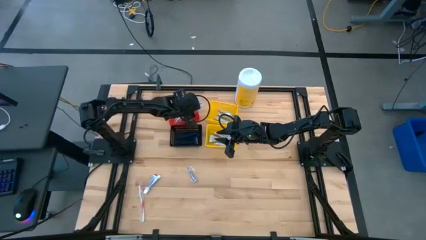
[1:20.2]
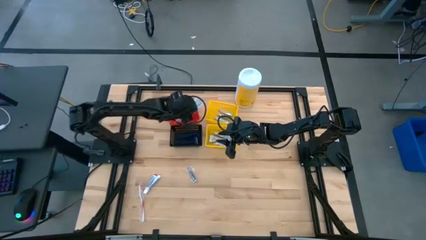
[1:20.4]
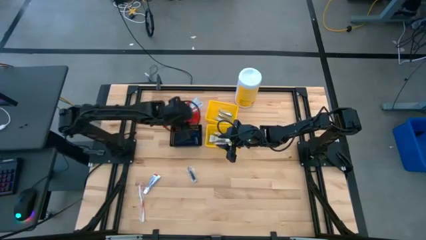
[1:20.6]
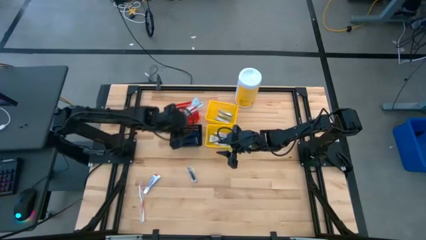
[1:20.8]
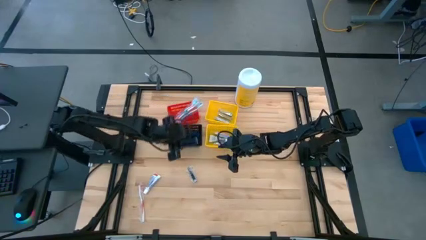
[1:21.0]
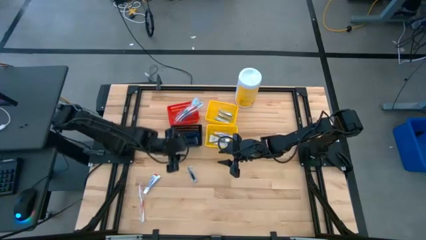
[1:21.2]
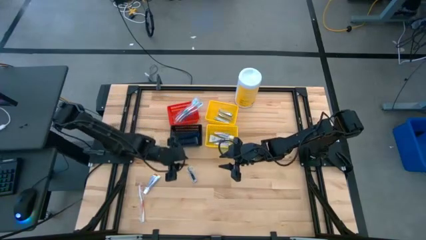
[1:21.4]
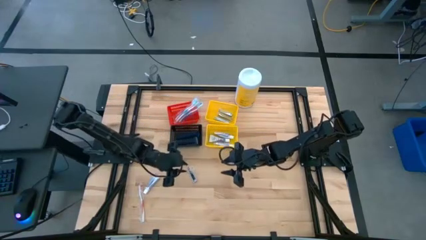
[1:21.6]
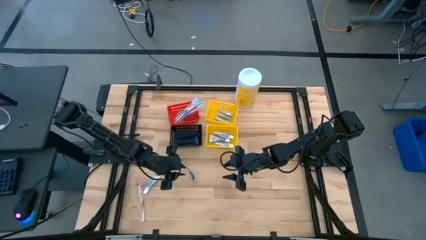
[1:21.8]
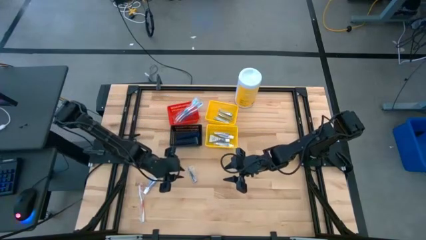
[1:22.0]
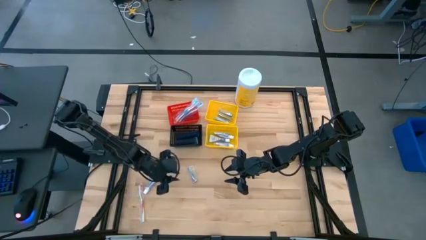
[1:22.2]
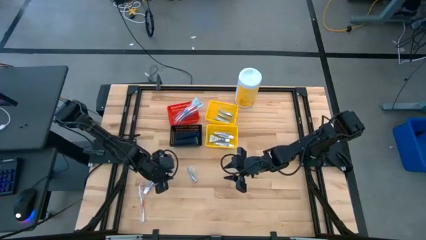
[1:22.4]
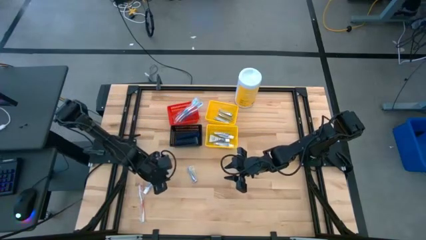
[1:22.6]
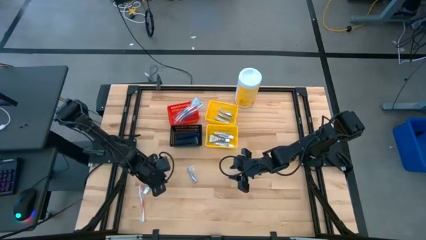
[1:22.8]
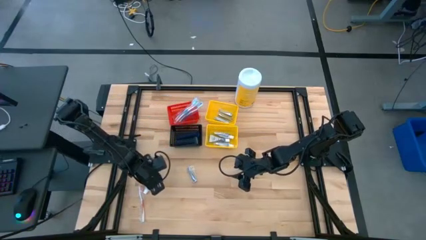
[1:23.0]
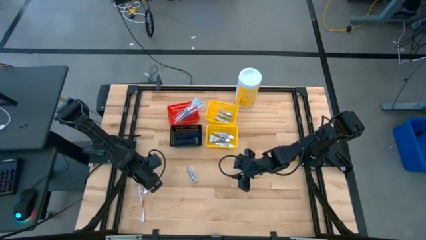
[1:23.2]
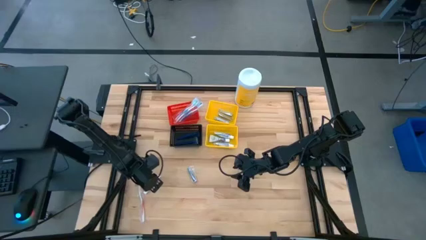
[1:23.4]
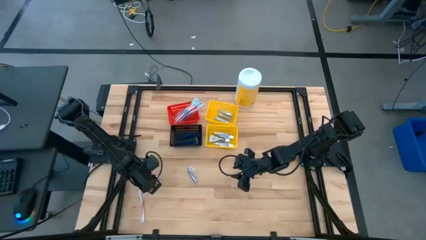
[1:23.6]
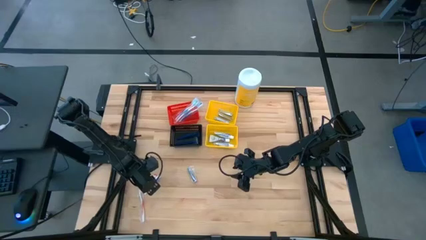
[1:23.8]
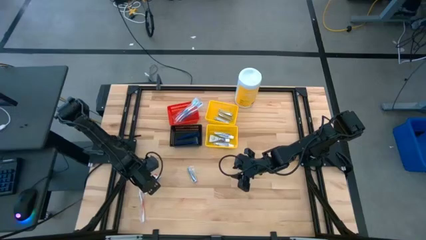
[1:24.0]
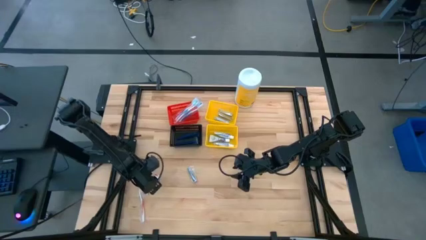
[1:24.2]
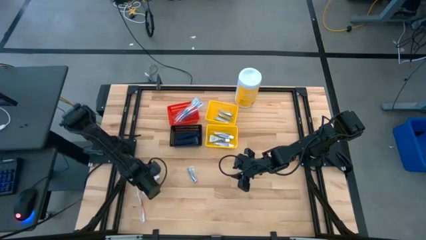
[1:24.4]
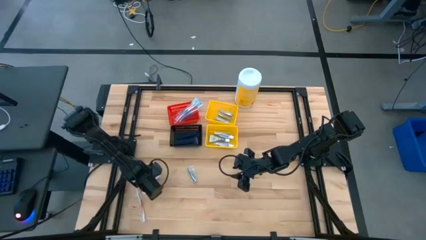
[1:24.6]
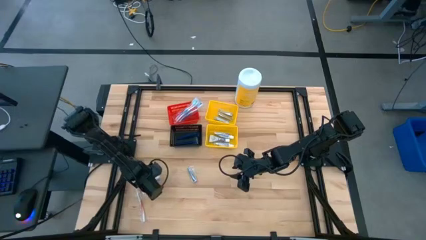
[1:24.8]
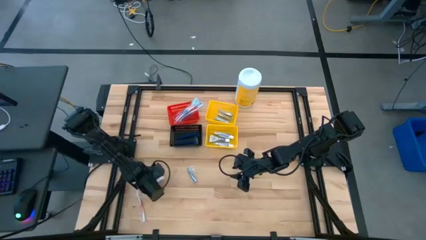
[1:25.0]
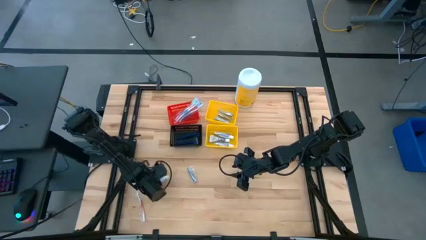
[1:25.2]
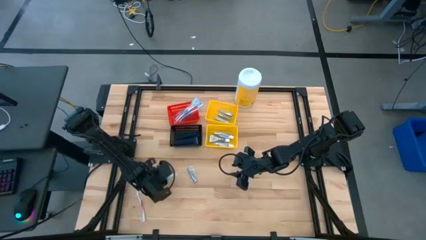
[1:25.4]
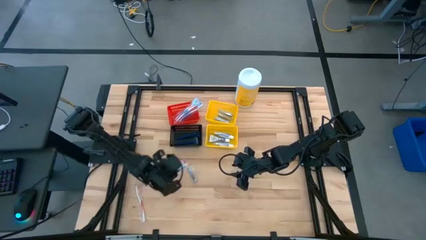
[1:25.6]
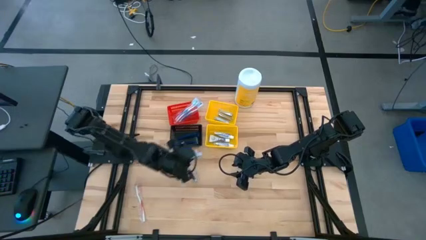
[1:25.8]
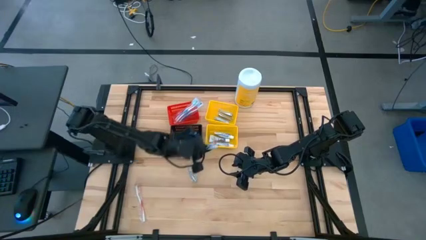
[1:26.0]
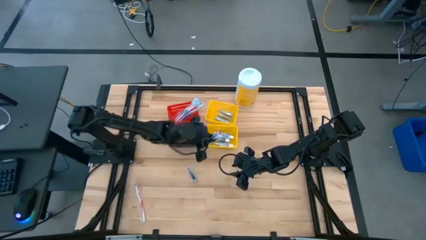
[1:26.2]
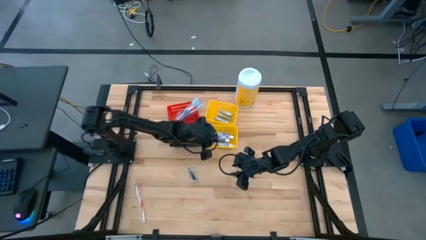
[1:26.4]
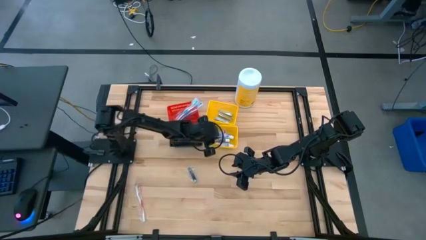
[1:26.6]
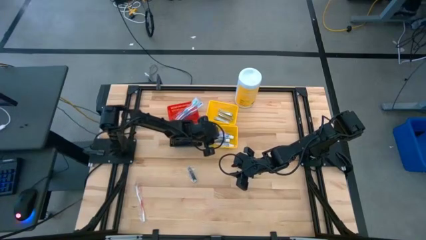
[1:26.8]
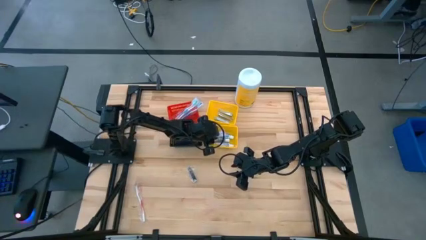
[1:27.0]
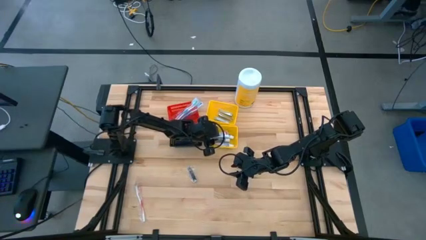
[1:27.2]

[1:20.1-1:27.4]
Task: Pick & Place Travel size toiletries
Put the white toothpaste into the bottom yellow bin

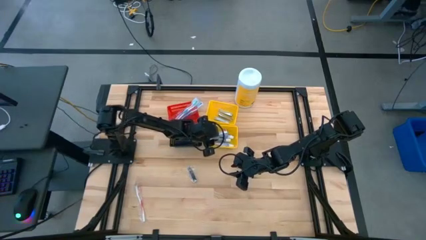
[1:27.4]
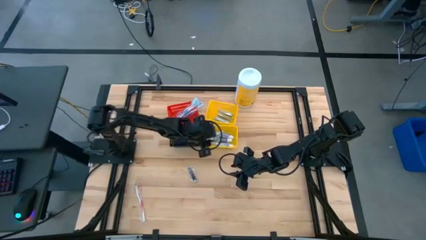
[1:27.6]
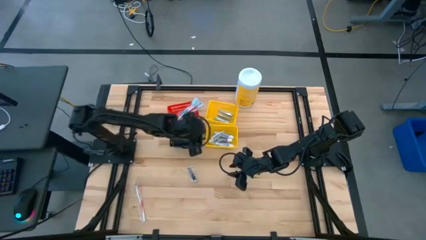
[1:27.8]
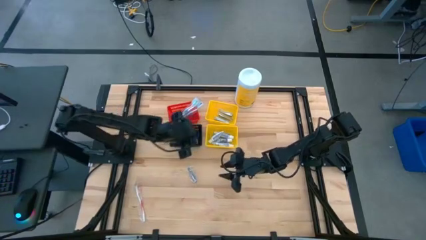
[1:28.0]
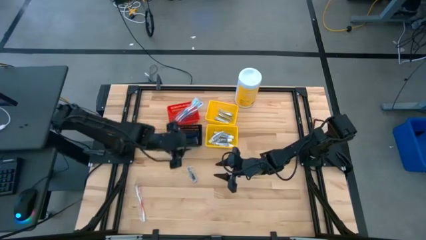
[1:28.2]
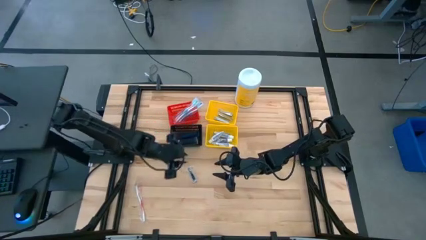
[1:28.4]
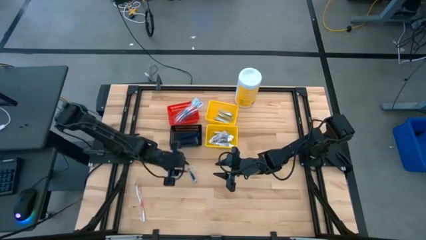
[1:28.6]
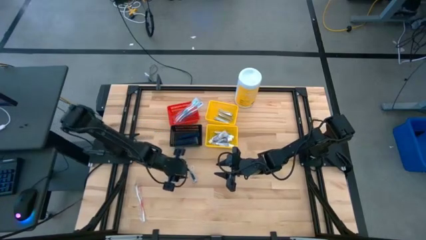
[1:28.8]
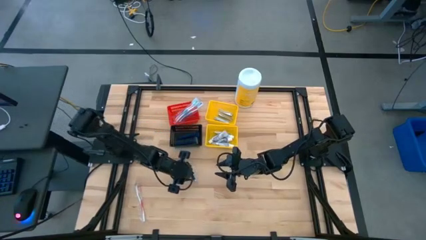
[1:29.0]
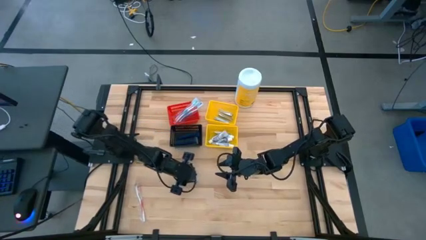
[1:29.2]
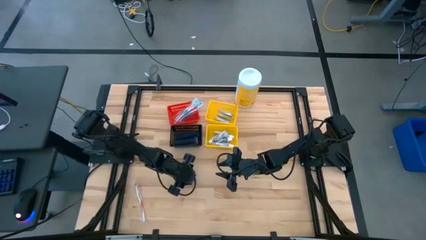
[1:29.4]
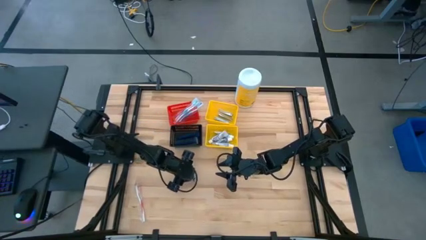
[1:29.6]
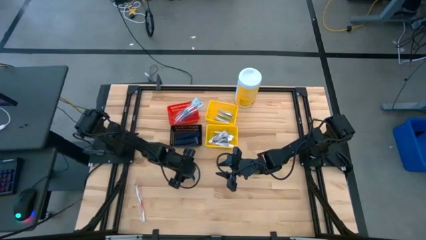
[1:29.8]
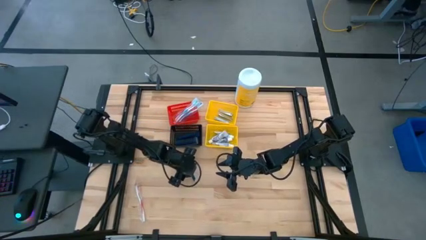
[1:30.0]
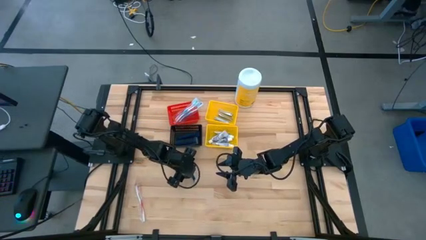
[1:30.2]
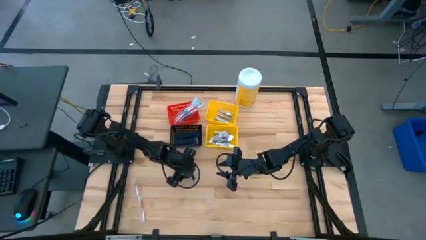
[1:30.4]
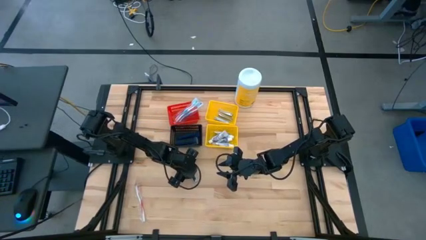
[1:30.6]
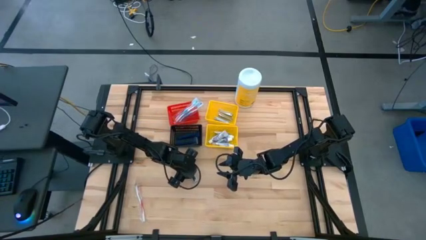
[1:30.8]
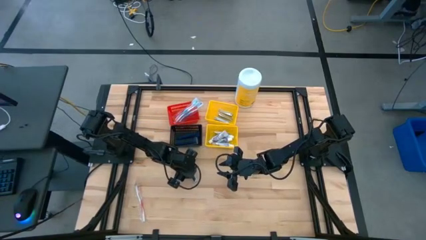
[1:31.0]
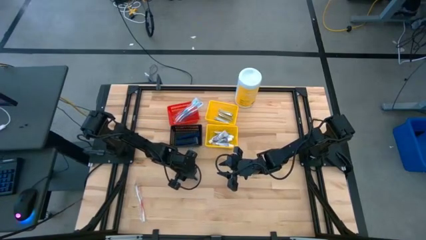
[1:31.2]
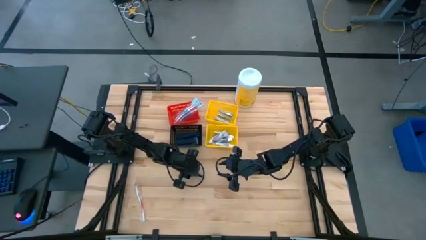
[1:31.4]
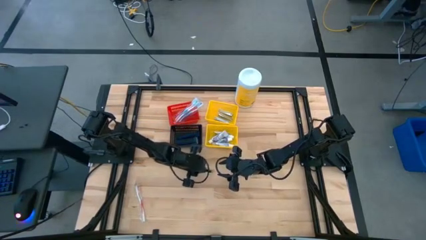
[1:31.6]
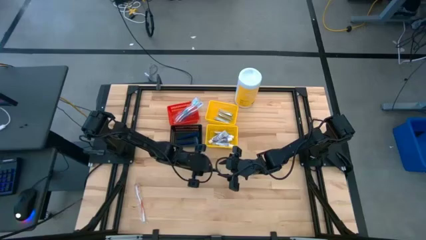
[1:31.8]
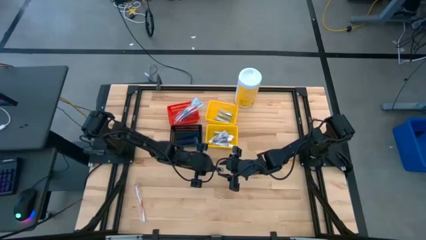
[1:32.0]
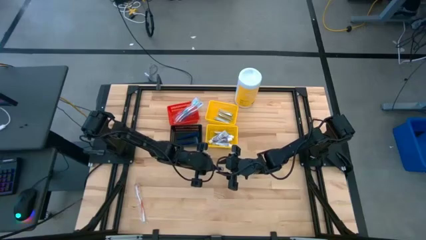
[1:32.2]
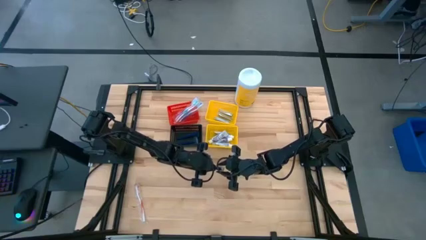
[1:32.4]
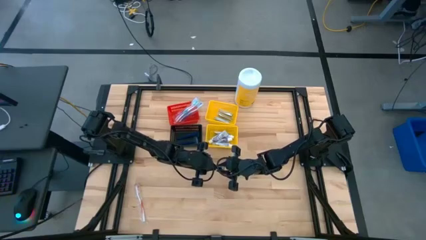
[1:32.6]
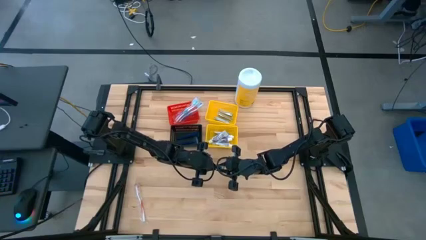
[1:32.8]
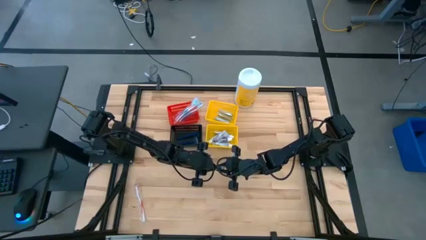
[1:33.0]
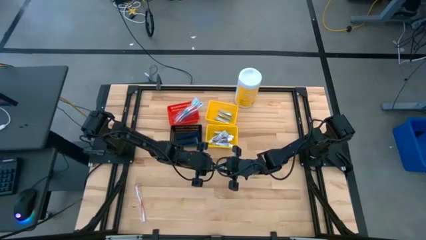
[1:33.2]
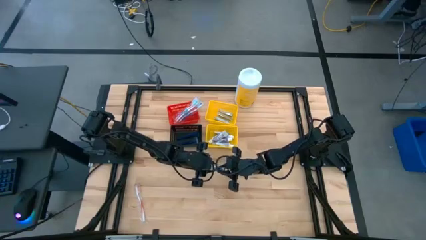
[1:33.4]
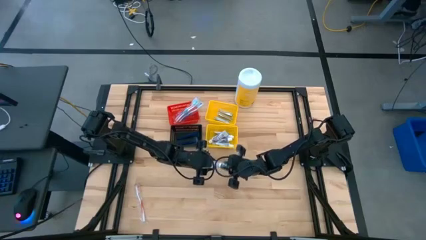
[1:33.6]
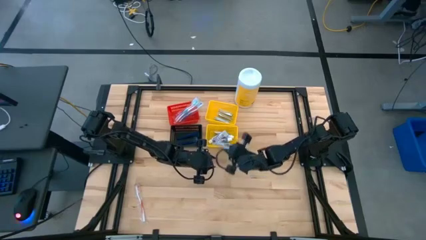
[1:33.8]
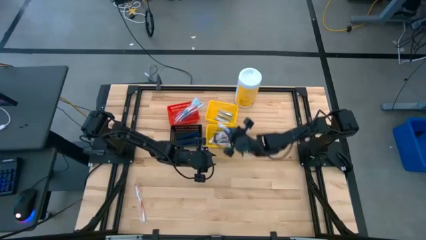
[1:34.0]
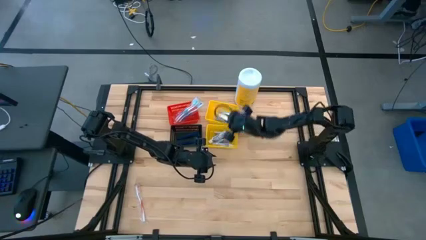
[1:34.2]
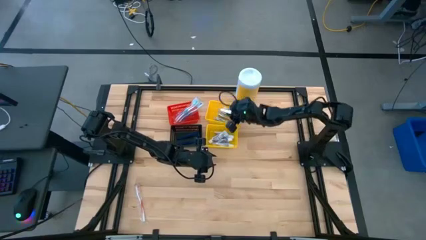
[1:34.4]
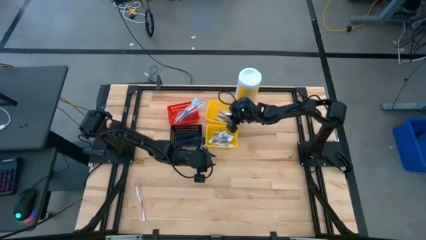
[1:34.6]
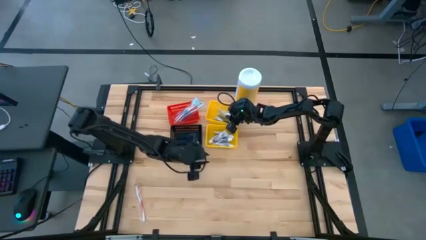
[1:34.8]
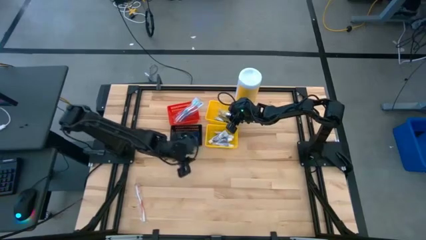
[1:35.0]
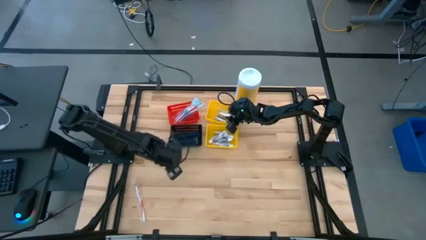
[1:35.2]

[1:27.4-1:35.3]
Put the silver nail cutter into the top yellow bin

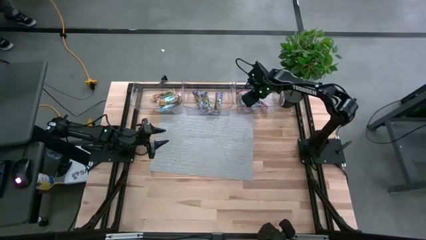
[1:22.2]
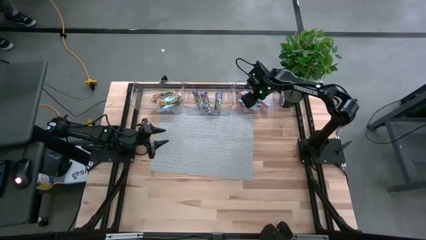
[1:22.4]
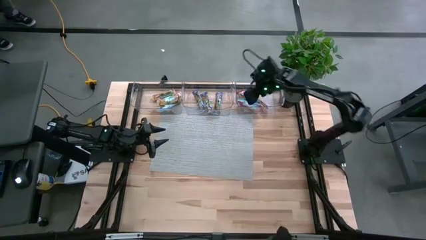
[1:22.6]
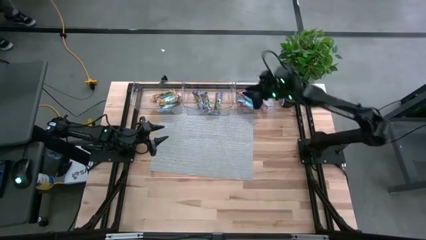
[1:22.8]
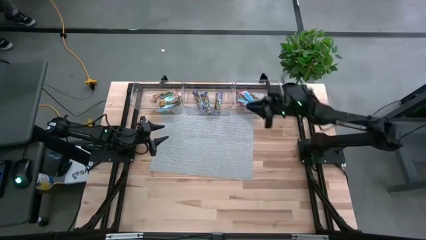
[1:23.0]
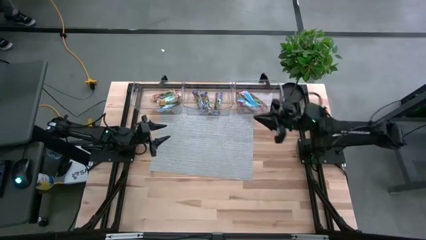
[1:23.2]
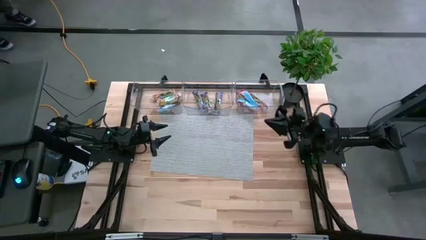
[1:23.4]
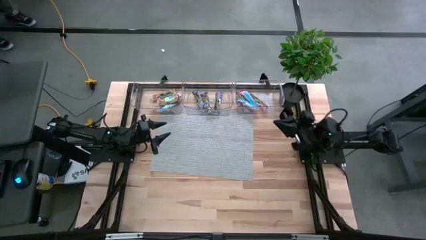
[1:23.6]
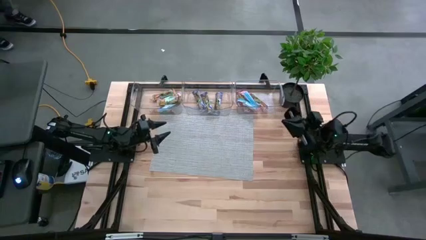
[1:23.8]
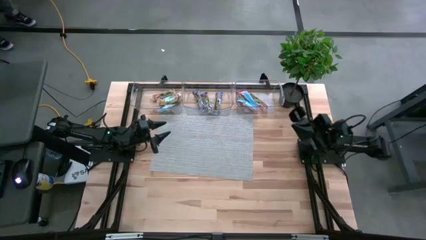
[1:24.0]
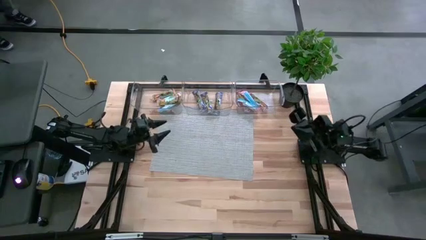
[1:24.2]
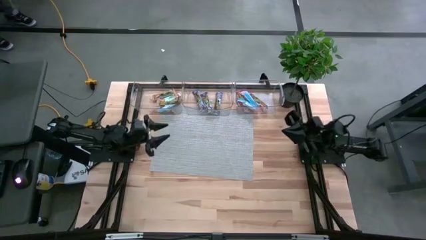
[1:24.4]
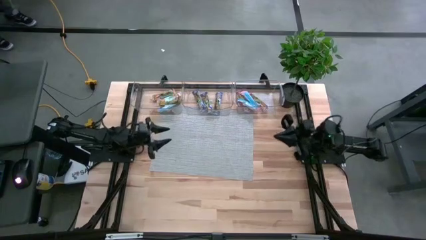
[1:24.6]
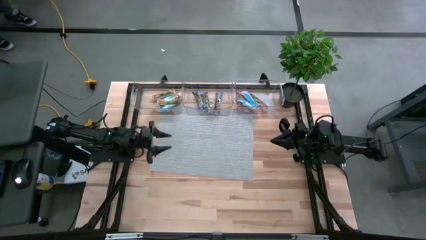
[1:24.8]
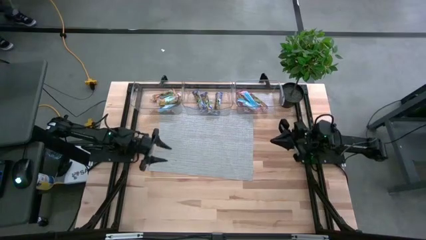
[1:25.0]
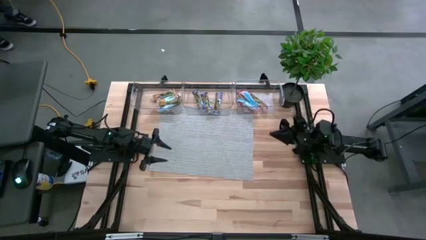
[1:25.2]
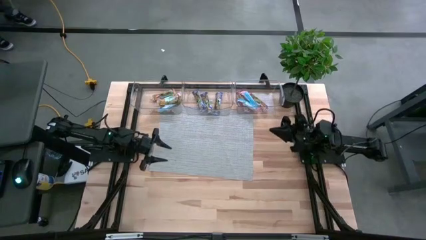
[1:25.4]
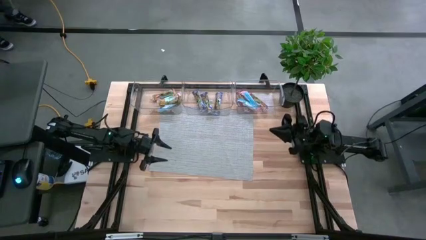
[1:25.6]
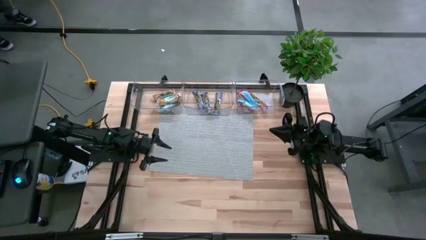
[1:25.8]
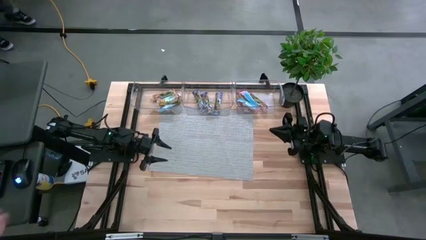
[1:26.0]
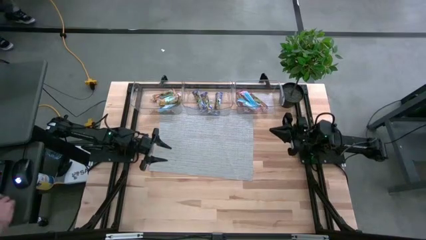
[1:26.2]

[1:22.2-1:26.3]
Task: Pick and place Granola Bars by type
Return to Home Position
